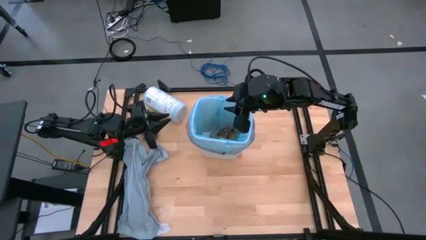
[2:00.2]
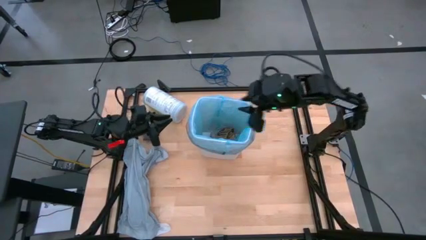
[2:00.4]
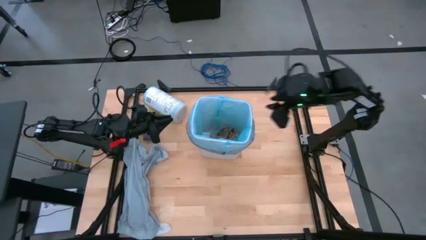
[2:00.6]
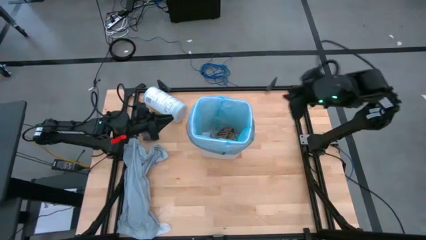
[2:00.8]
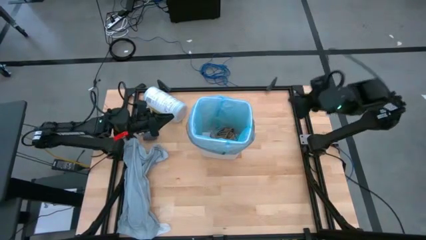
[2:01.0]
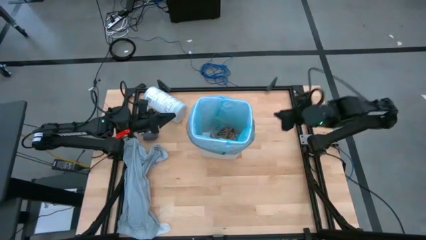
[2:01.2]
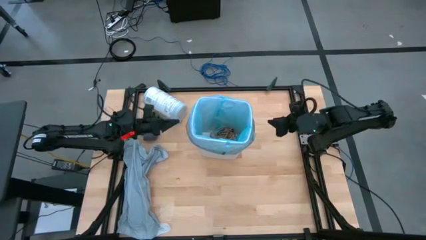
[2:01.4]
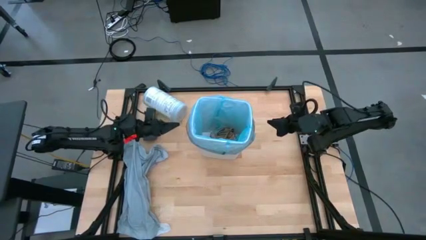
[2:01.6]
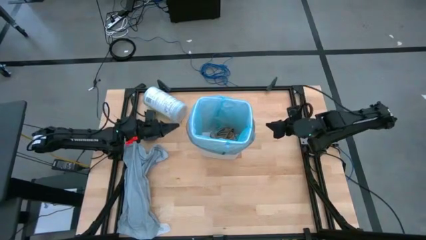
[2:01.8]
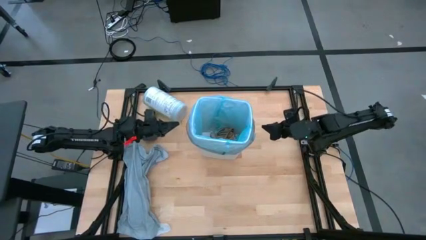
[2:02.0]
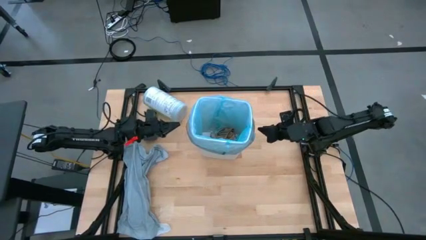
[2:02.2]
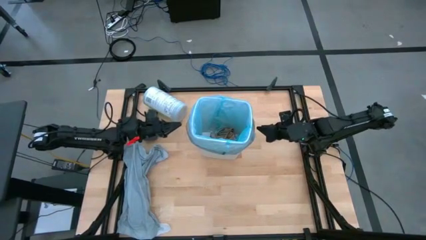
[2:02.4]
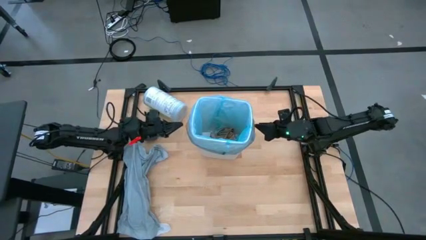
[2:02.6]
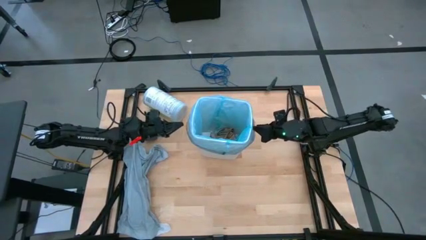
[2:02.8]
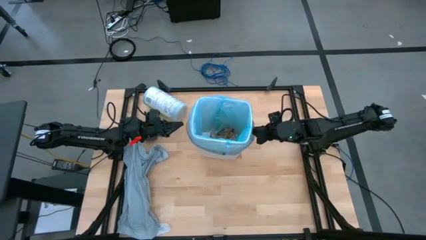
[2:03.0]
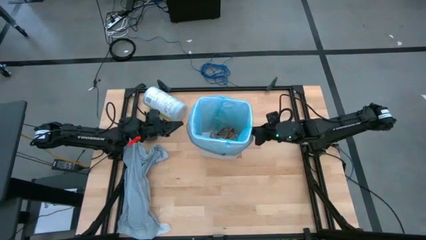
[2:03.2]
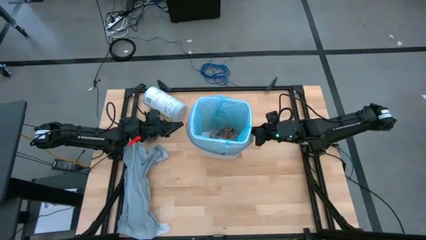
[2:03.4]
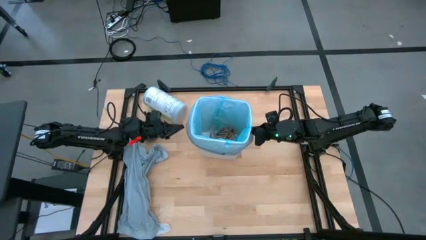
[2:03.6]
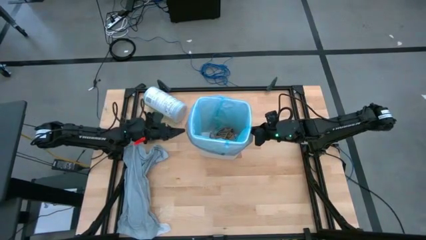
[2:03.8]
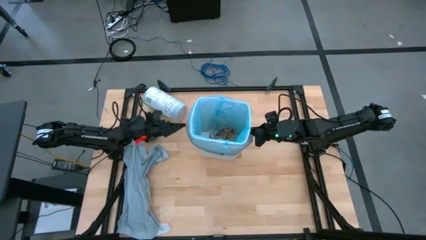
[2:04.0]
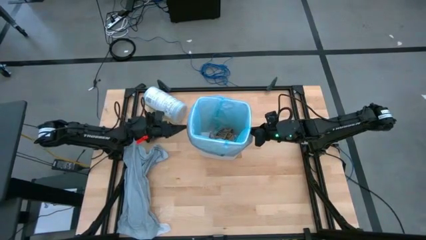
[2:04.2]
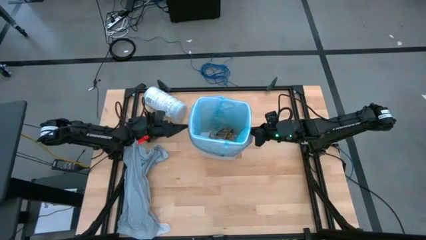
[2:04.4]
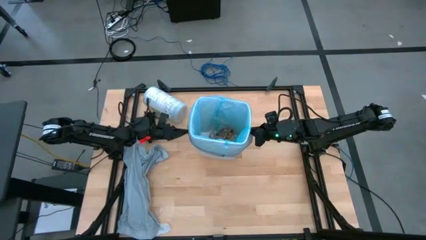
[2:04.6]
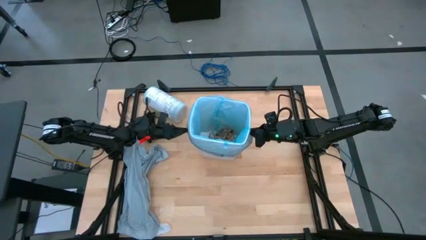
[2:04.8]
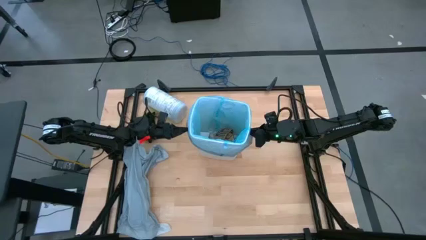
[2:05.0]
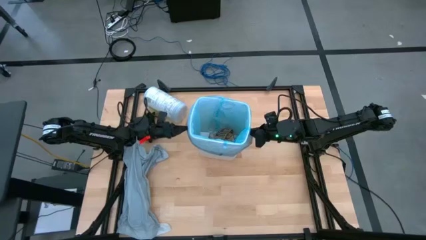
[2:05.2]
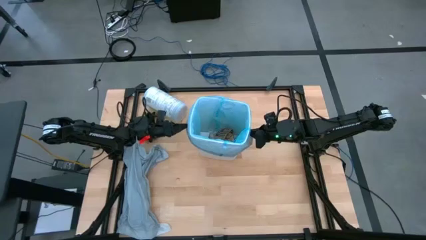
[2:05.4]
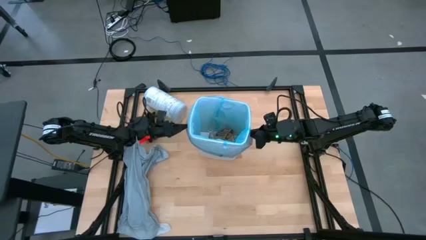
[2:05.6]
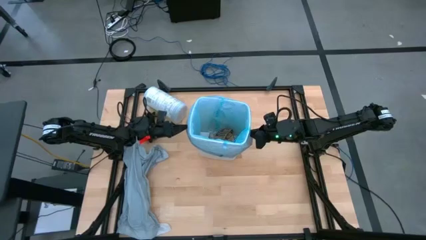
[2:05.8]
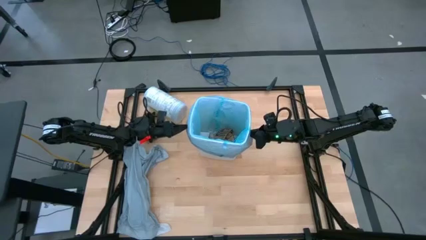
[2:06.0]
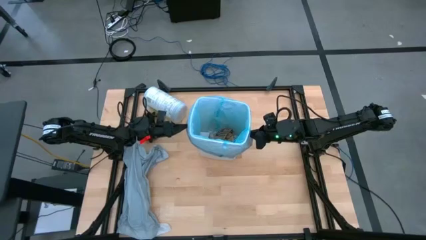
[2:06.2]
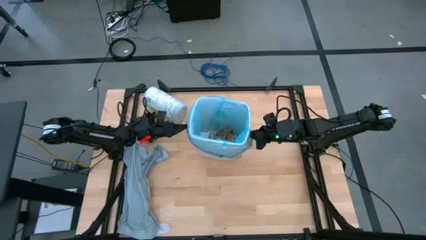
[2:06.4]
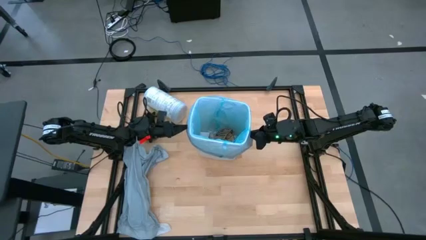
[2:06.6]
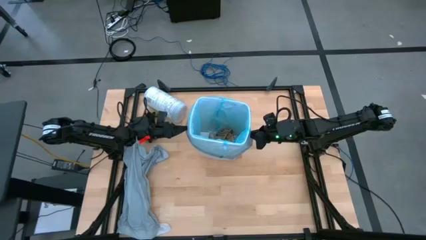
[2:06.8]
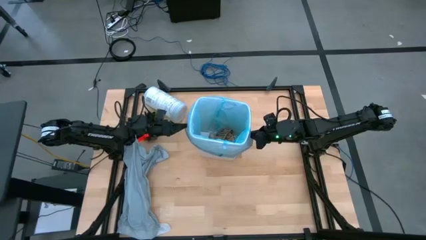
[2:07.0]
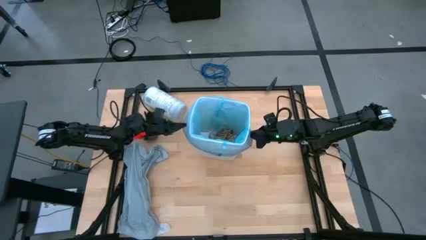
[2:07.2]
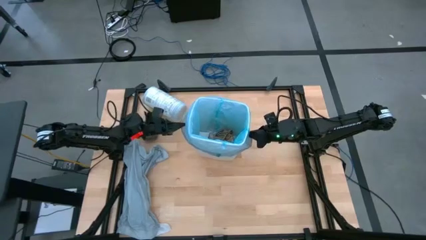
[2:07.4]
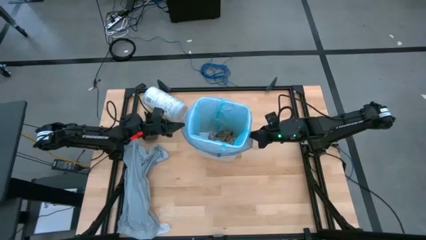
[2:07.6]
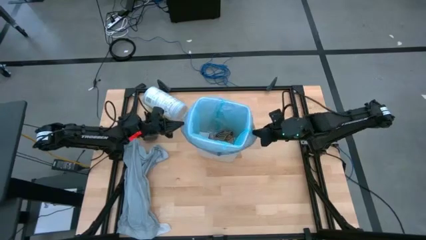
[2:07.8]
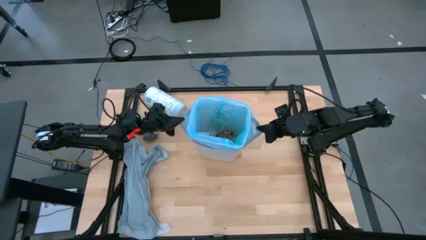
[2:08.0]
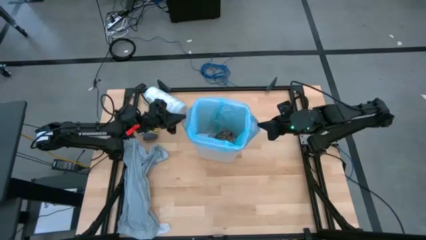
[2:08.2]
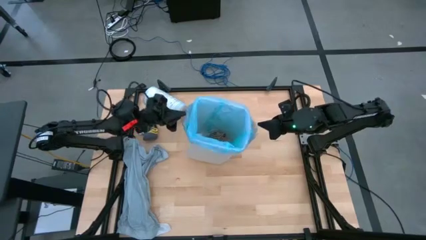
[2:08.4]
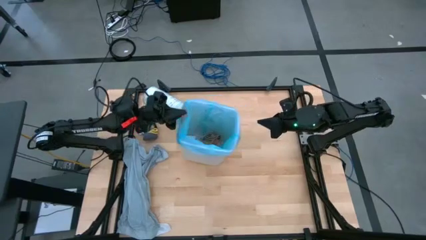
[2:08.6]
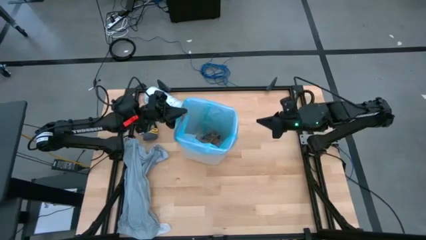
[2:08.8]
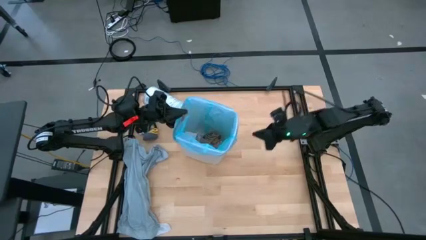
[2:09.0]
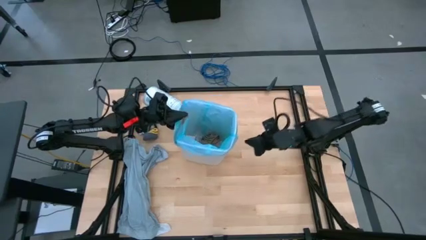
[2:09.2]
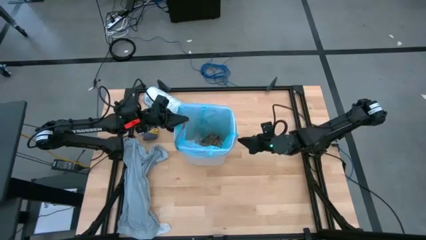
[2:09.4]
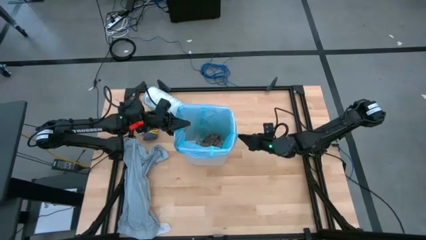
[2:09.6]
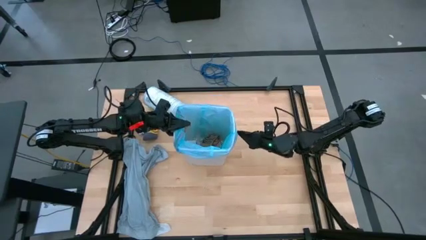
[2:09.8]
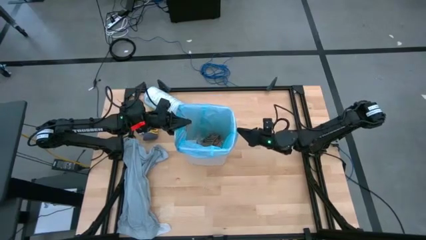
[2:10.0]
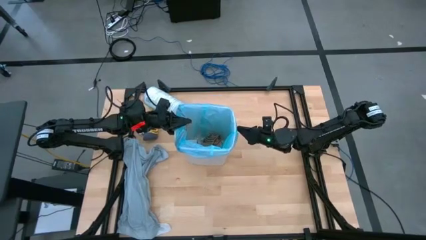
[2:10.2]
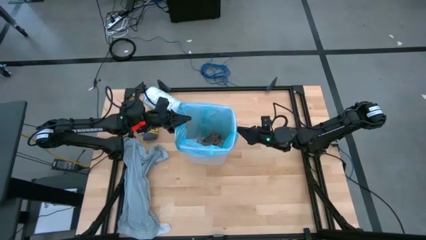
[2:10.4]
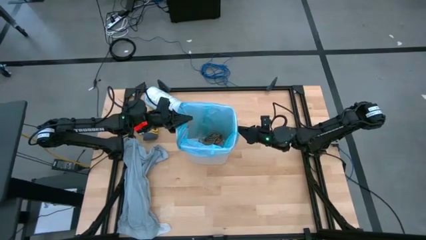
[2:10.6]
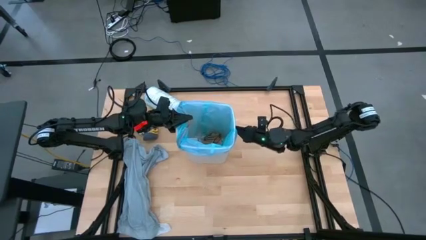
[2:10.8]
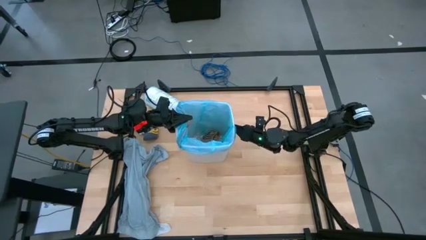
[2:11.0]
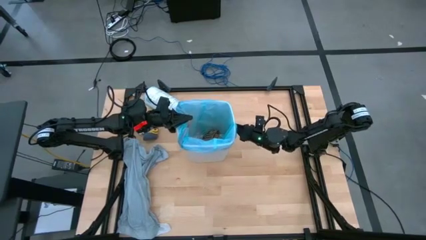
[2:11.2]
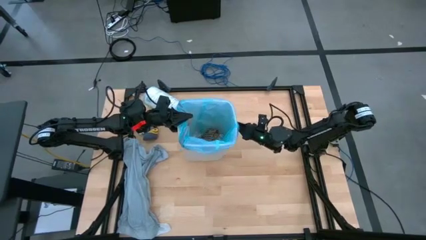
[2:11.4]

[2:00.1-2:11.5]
Task: place trash/remove bag and relplace
Remove the blue trash bag from the trash bin

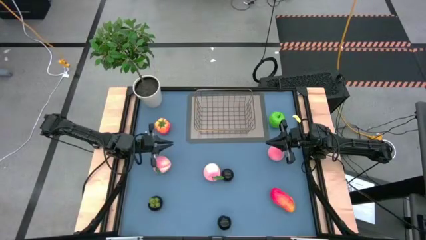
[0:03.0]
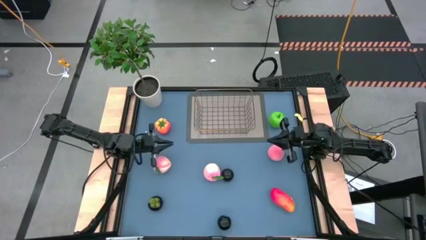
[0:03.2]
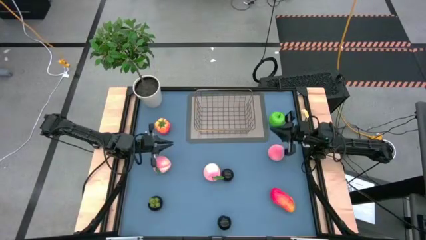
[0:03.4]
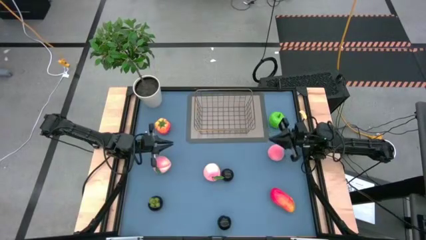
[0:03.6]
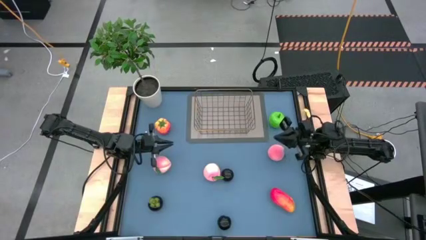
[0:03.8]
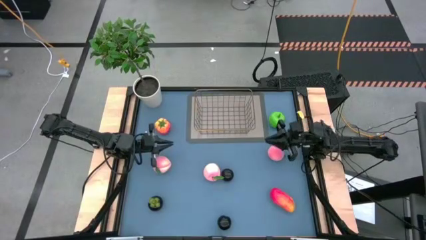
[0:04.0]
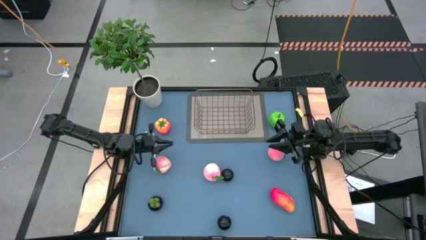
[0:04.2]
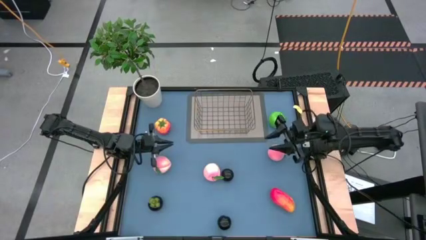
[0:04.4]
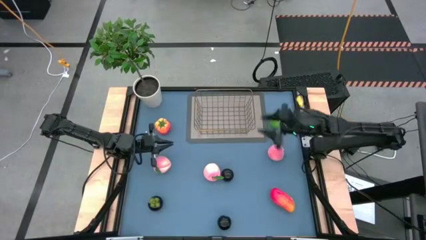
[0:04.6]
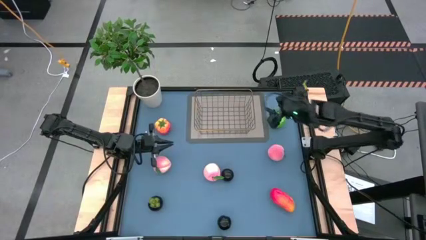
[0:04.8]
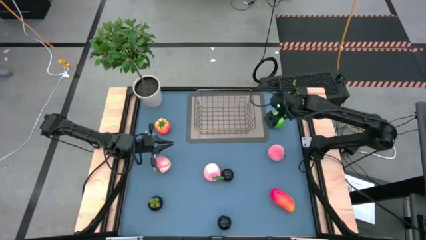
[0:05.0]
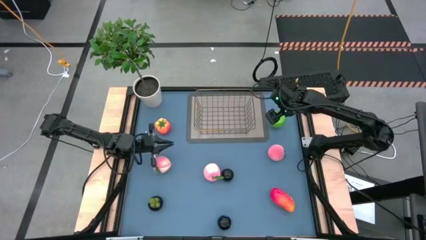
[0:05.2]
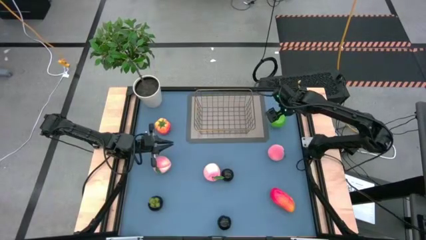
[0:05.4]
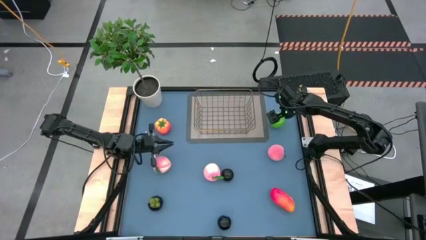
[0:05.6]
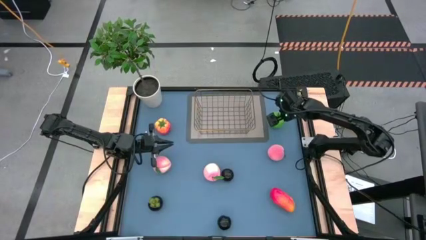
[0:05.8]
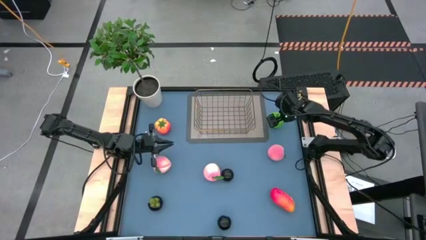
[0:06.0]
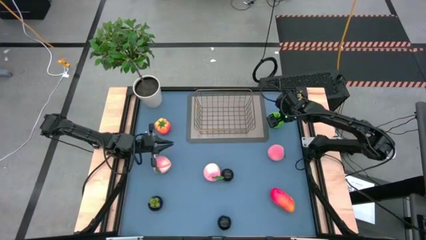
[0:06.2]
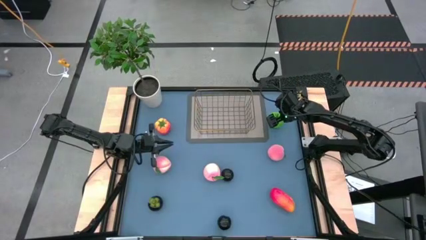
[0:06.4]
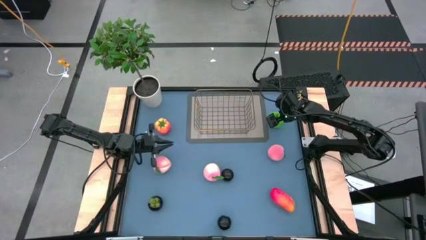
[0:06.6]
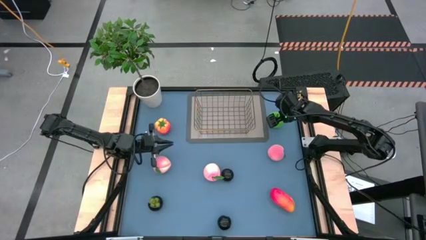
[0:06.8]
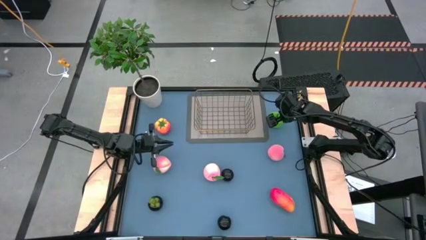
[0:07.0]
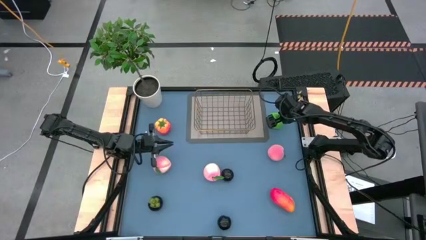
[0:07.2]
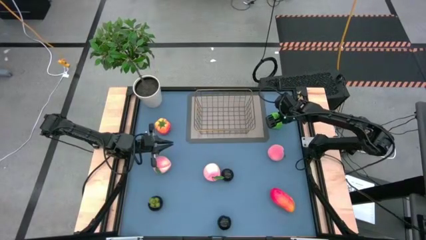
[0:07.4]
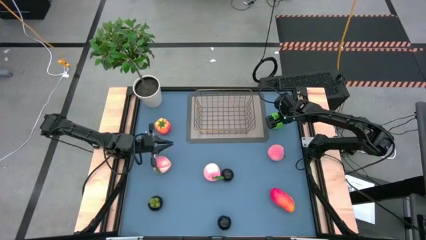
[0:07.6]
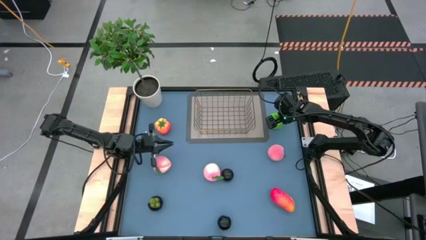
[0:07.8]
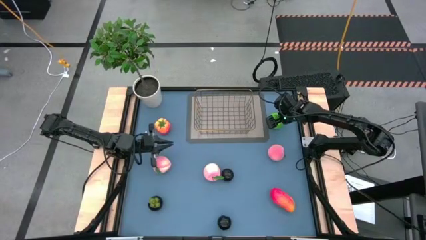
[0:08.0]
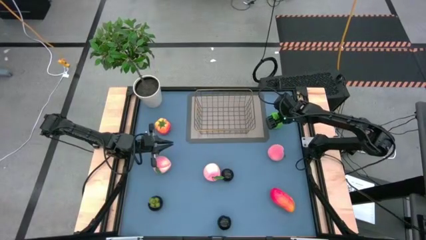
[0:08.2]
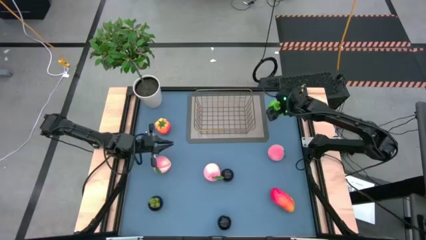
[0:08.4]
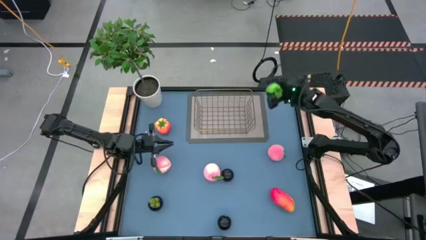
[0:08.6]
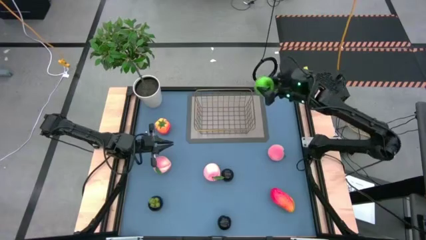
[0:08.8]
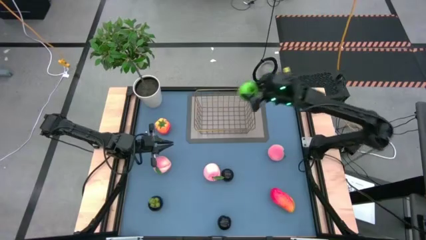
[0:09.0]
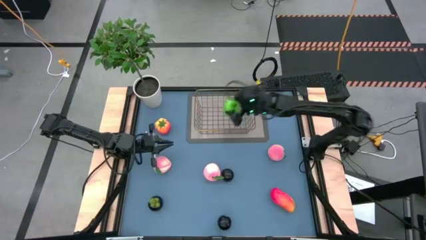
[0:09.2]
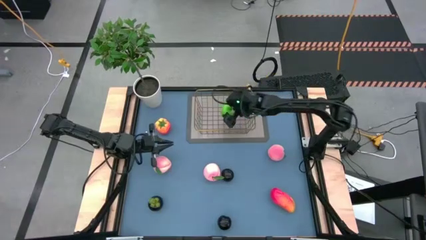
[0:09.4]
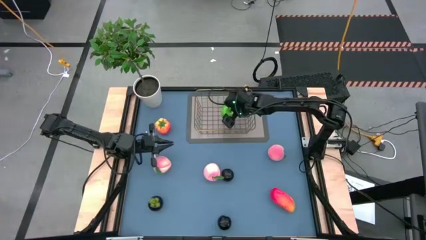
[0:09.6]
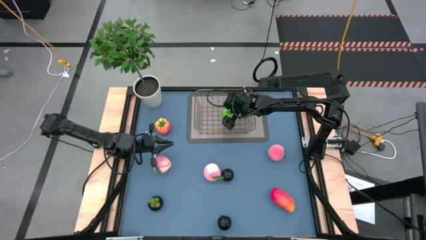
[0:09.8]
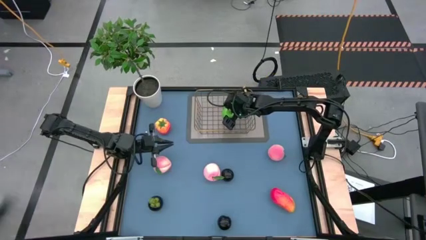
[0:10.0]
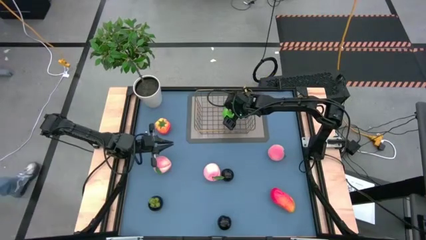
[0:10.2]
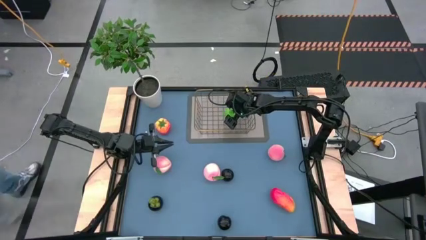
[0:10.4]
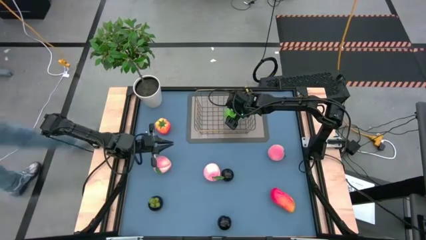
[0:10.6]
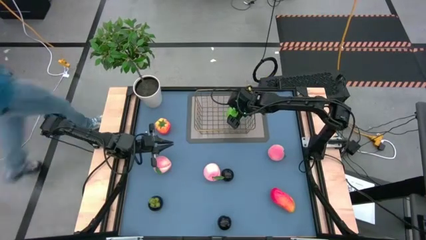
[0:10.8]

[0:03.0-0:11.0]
Task: Build produce basket
Put the green apple into the wire basket
